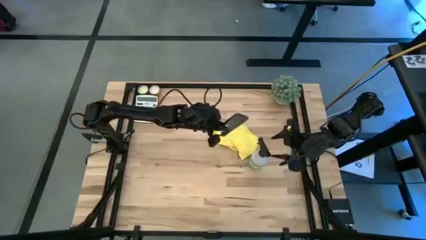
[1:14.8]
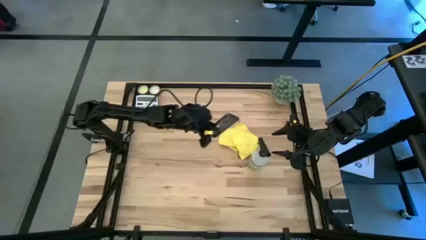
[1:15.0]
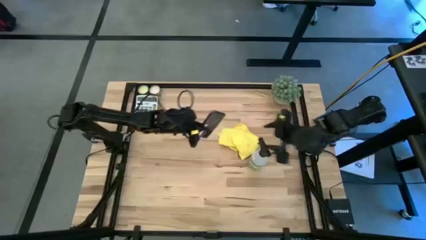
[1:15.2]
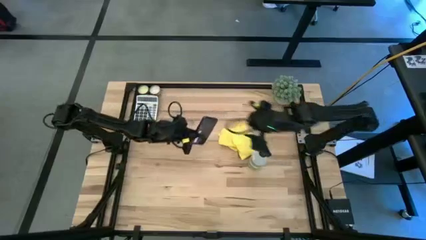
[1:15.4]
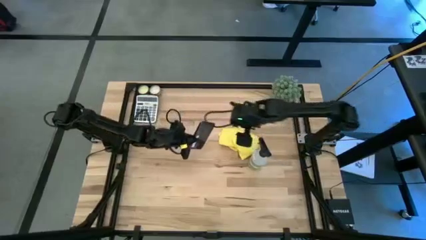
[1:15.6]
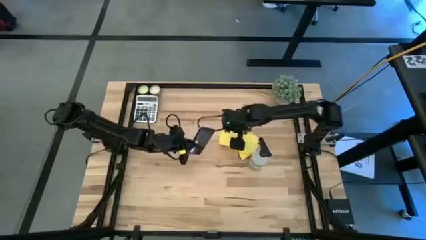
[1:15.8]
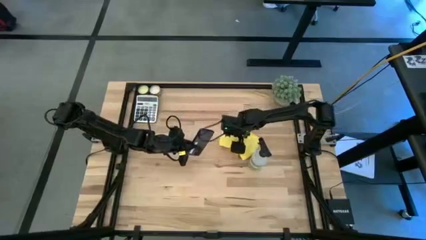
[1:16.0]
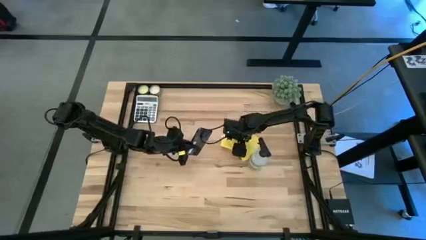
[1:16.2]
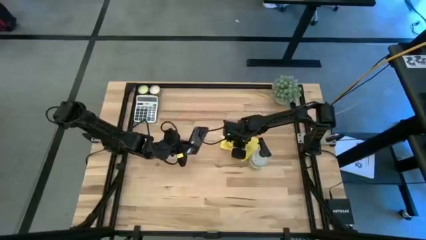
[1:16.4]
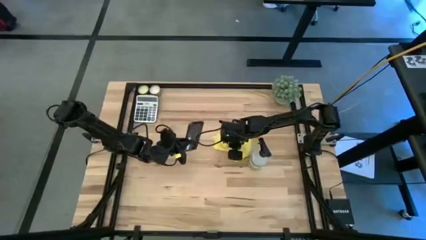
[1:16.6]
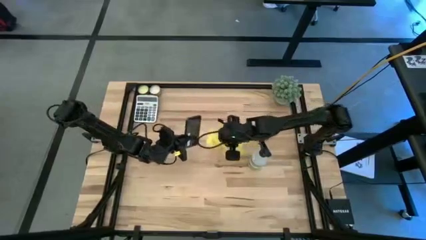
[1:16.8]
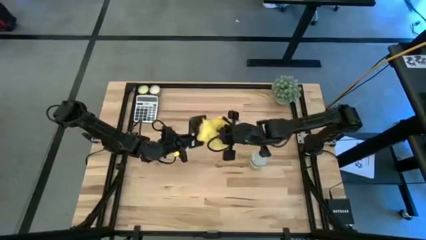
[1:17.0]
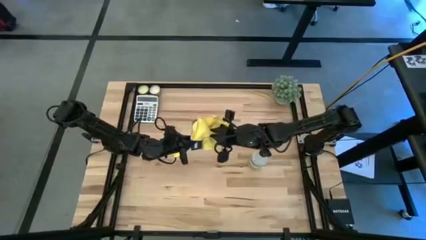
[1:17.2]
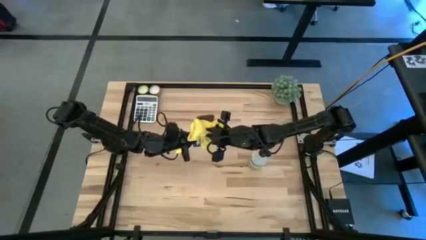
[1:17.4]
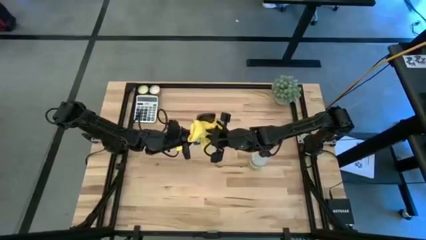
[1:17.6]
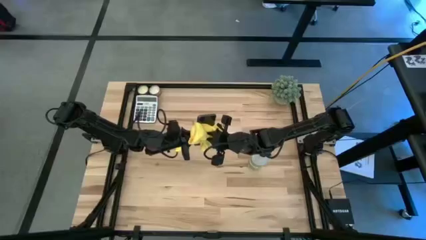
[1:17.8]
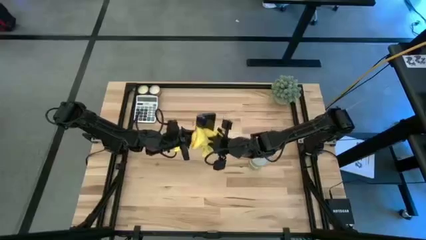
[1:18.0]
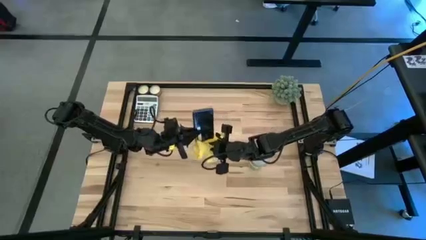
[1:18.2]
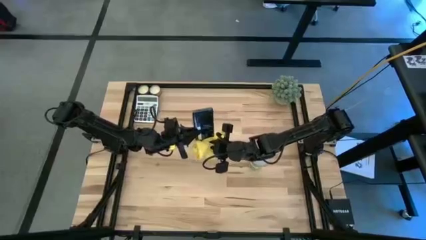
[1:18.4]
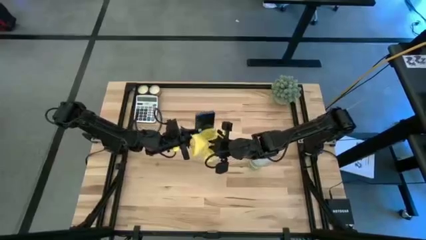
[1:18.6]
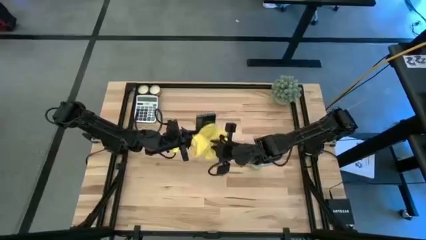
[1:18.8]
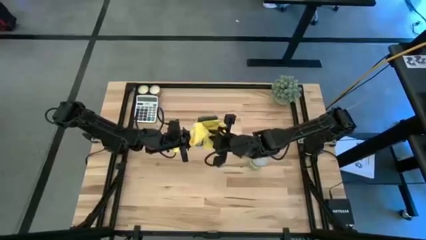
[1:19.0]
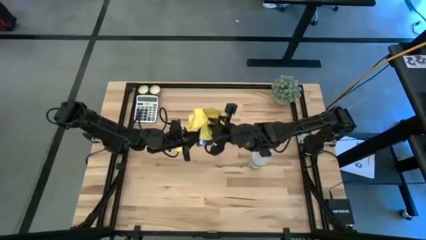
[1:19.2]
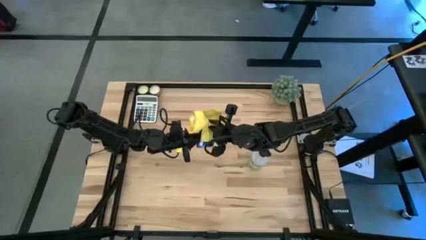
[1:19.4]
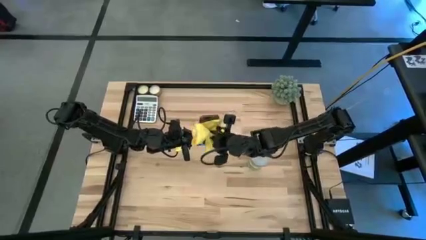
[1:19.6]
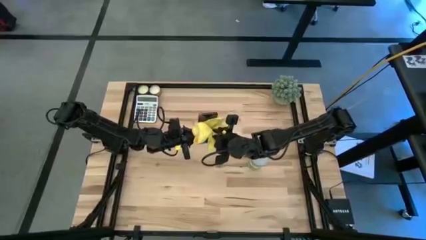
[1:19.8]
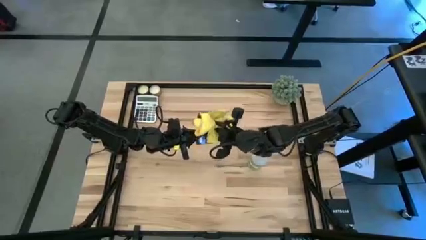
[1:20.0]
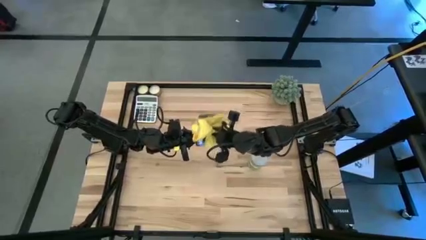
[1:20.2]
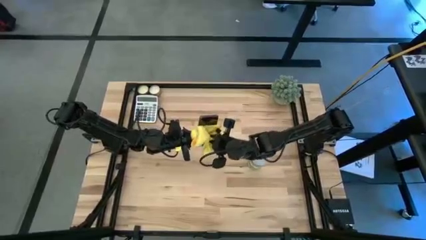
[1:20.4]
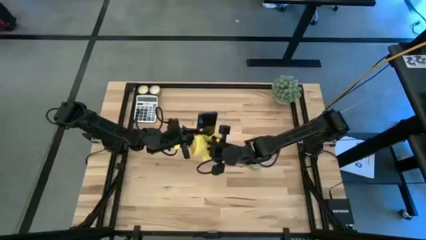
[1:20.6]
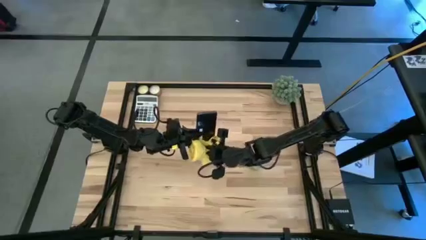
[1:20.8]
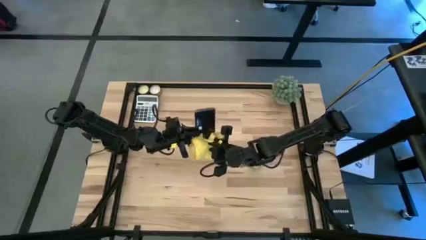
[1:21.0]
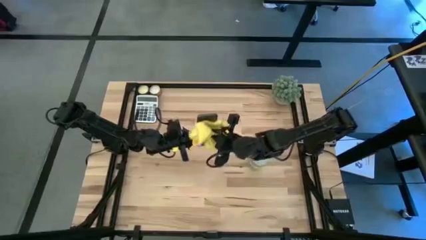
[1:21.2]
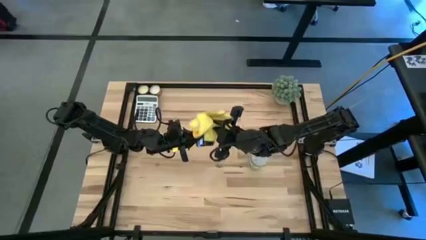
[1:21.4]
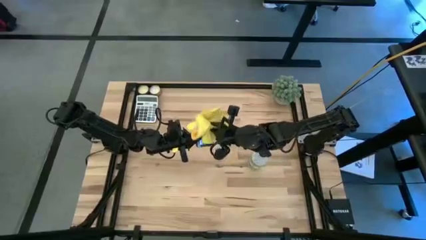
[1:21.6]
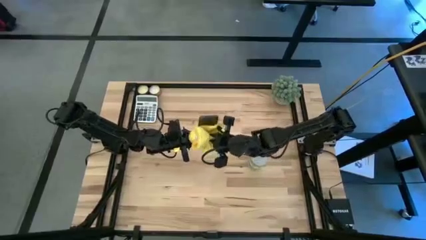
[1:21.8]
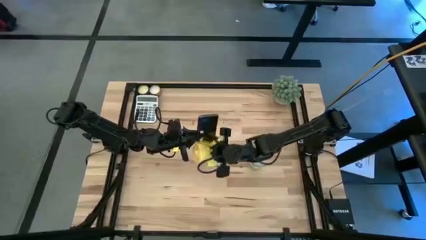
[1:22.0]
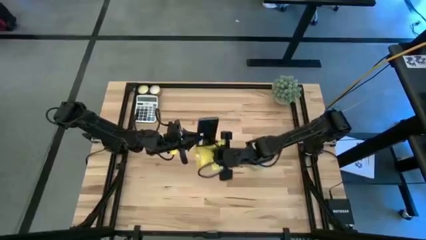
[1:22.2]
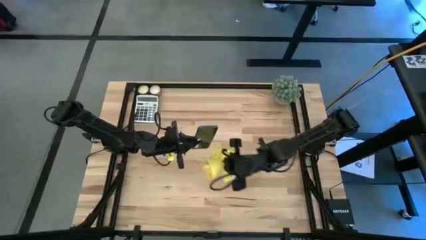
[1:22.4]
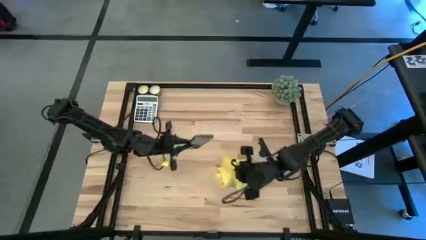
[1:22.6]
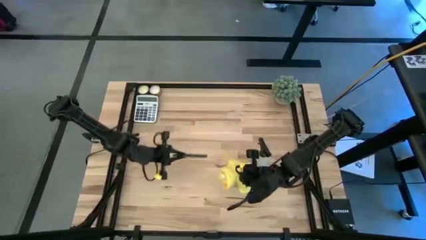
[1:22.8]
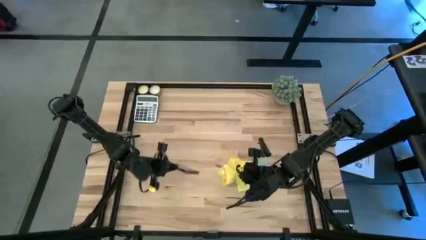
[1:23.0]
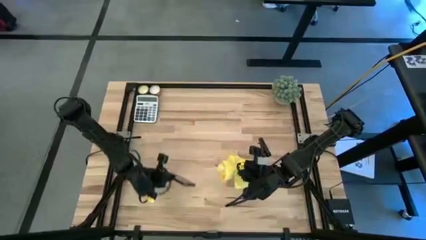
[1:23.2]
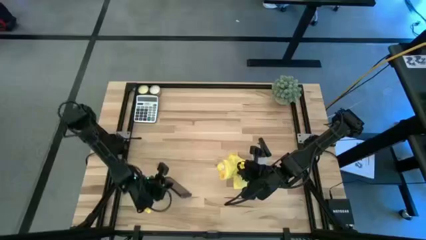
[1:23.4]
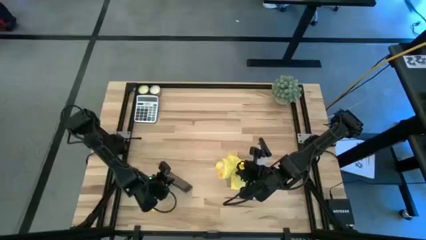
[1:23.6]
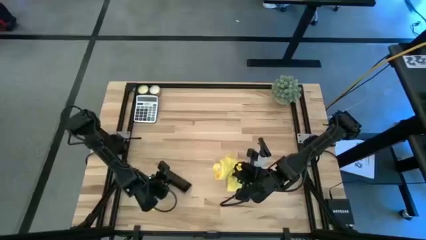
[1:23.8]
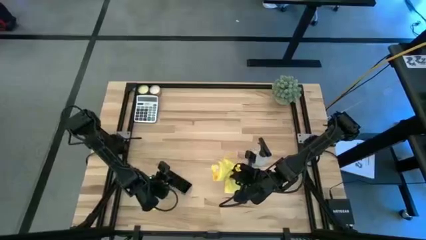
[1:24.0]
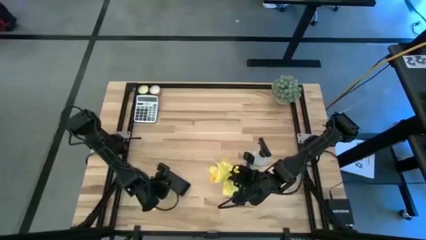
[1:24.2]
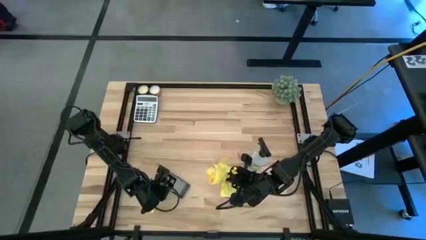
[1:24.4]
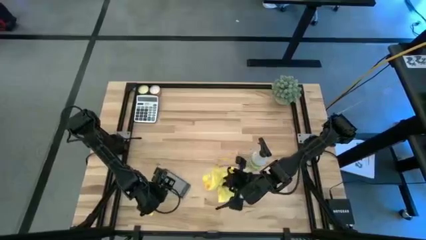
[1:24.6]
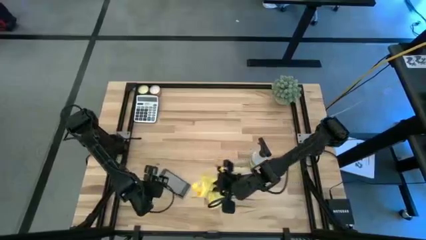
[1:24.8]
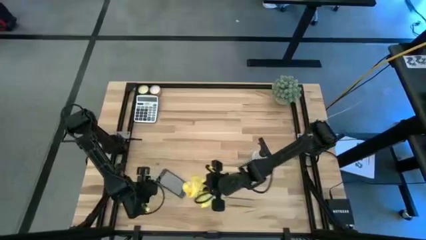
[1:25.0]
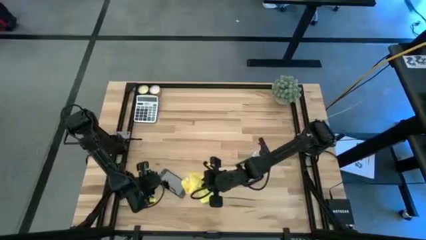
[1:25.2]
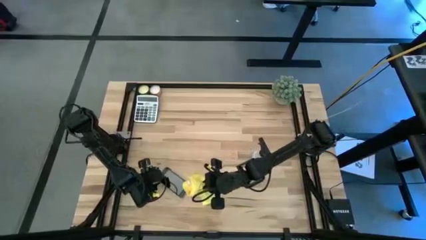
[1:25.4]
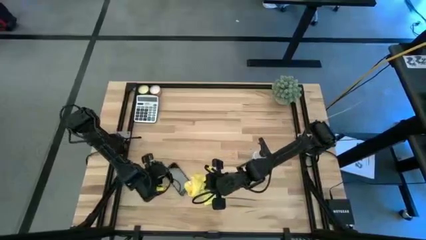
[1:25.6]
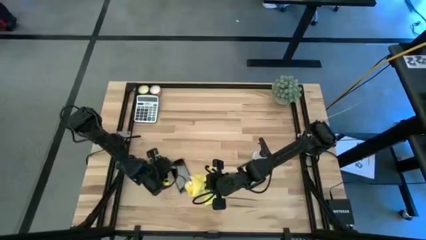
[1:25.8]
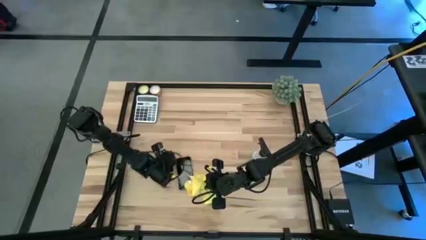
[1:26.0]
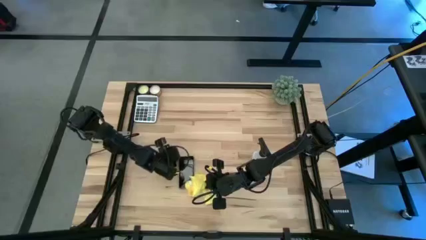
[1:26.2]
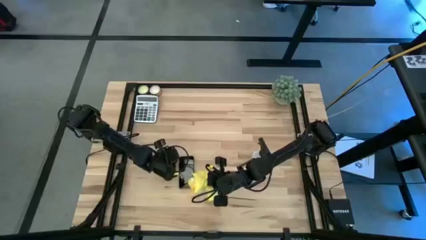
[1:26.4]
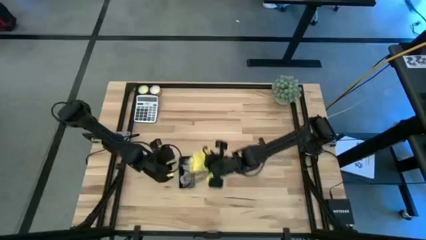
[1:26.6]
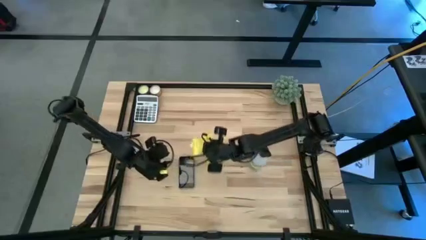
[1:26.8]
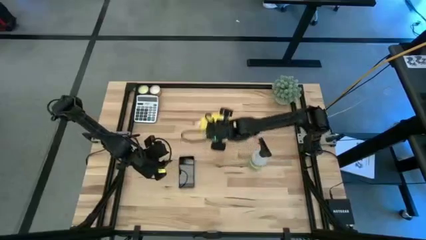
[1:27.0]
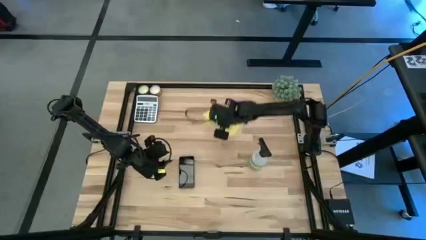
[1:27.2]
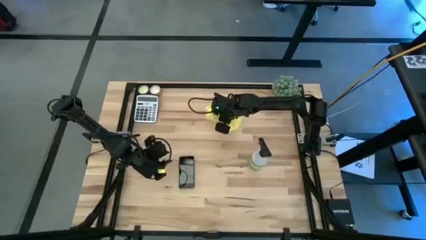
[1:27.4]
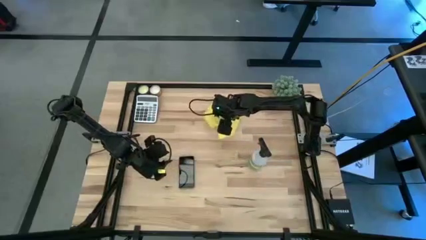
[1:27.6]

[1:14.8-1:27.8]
Task: Apply microfiber cloth
Wipe the back of the black cellphone with a yellow microfiber towel

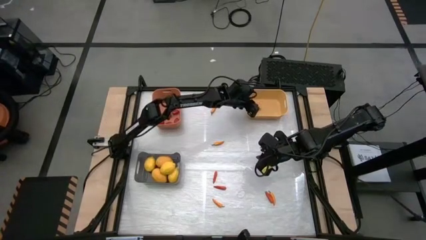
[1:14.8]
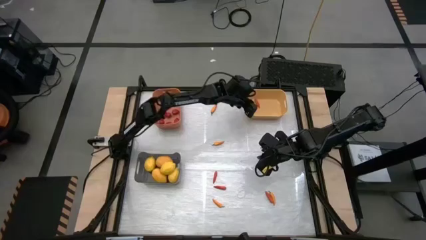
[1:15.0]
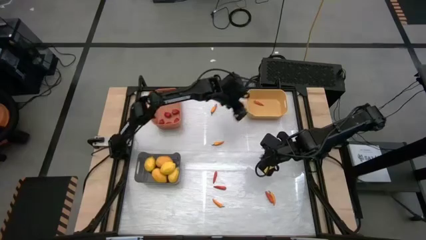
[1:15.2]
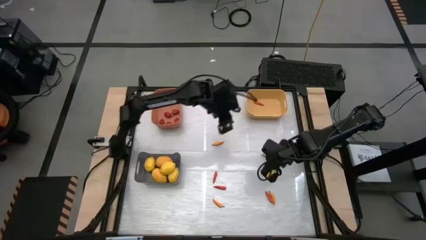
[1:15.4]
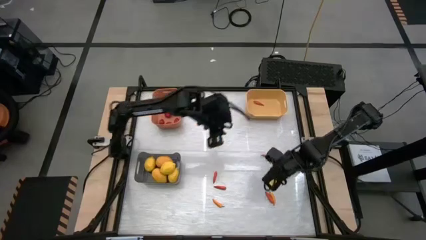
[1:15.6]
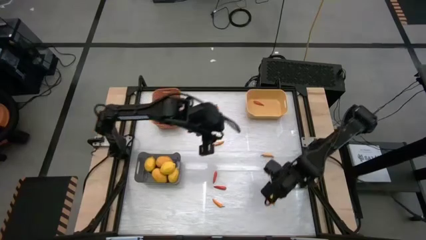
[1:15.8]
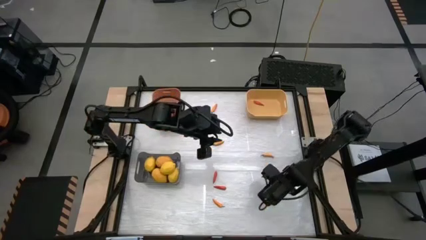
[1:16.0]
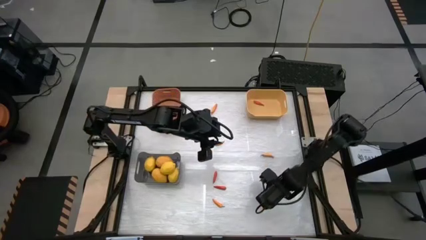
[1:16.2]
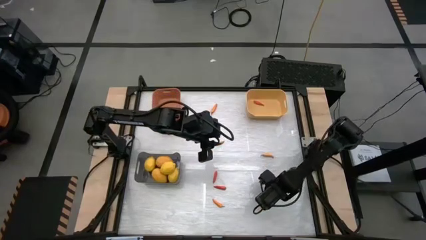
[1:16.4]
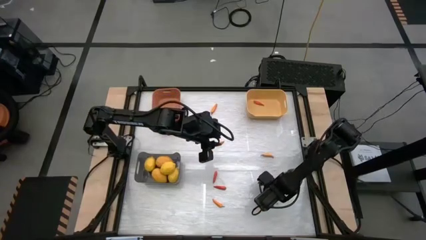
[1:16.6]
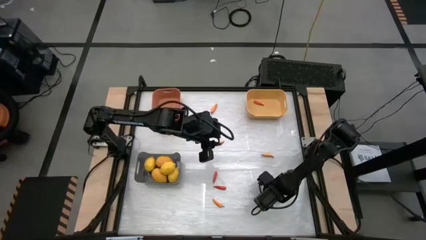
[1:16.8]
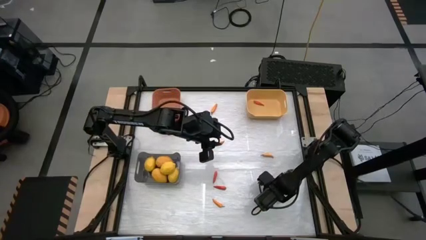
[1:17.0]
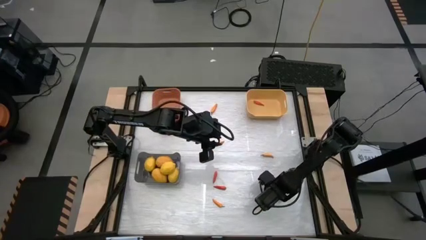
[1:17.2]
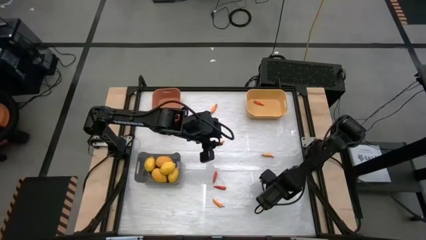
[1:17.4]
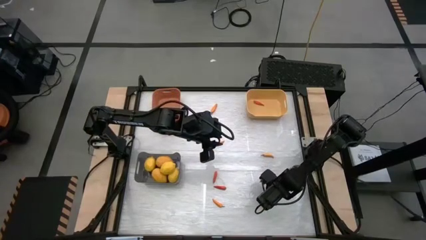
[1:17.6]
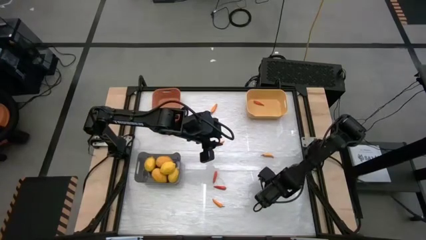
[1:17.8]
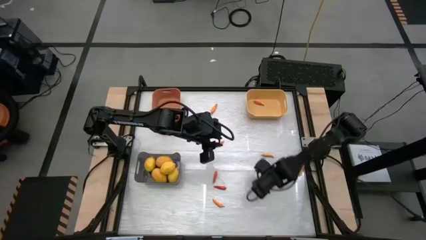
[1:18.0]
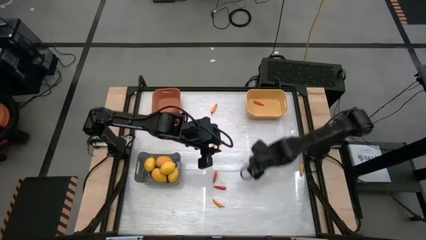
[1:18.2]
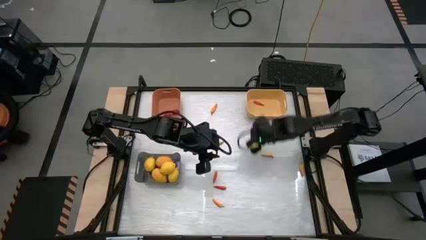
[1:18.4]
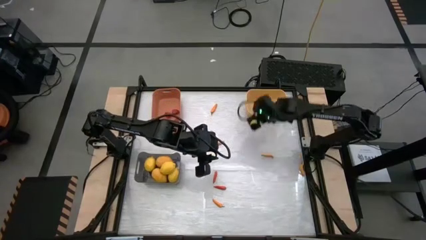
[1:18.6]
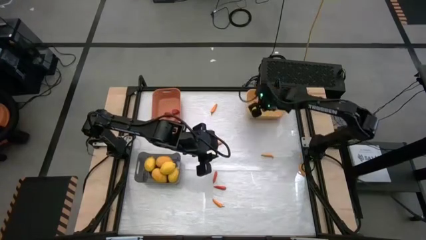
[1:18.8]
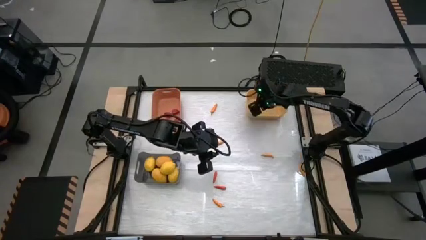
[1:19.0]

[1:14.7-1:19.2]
Task: Sort produce into baskets
Put the orange chili pepper into the yellow bin
